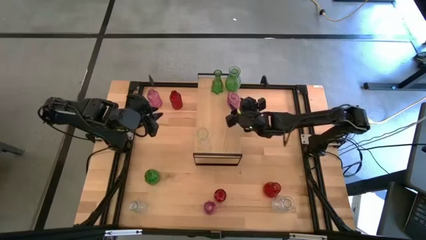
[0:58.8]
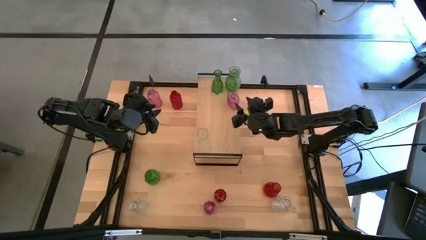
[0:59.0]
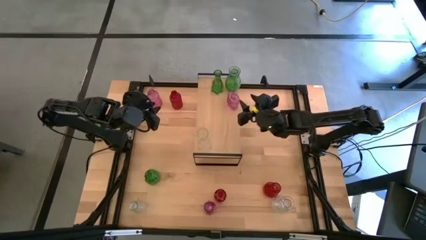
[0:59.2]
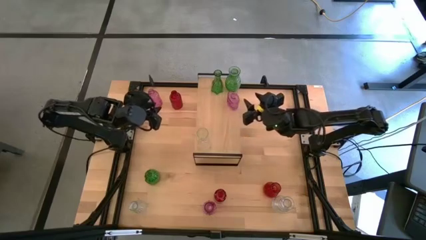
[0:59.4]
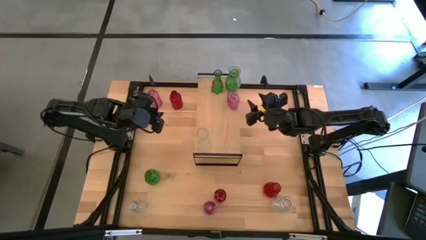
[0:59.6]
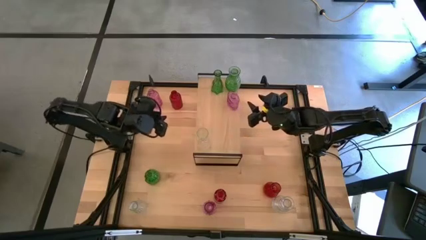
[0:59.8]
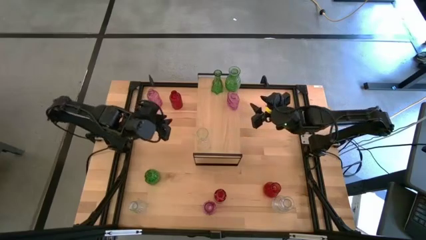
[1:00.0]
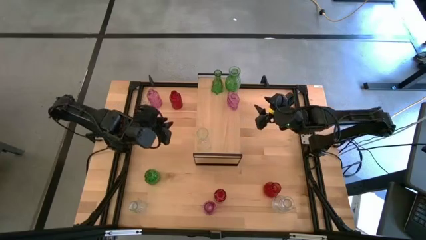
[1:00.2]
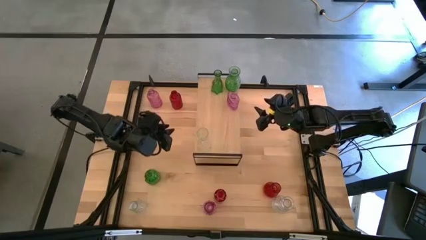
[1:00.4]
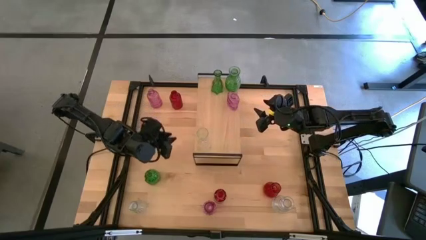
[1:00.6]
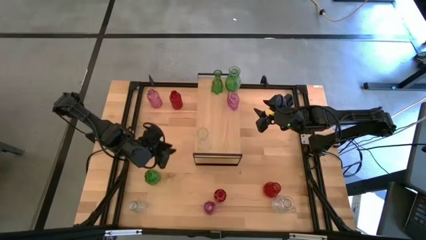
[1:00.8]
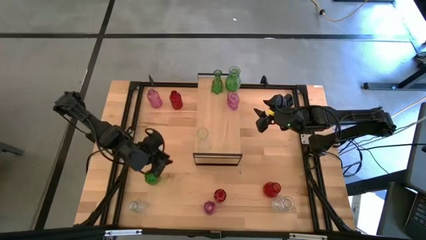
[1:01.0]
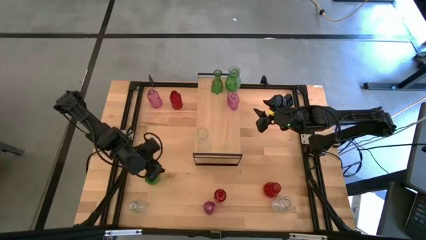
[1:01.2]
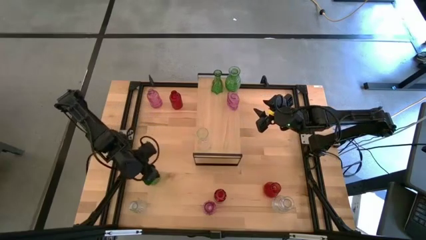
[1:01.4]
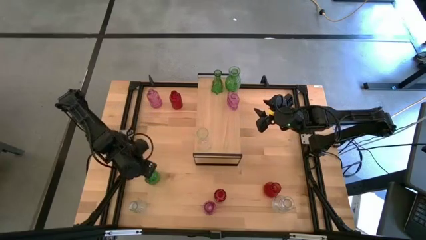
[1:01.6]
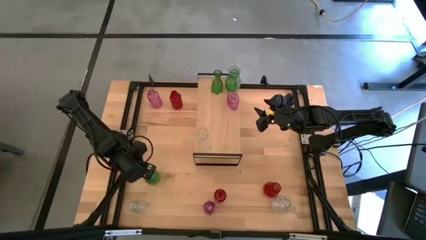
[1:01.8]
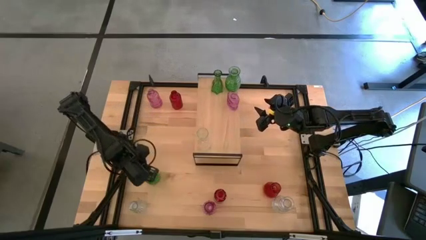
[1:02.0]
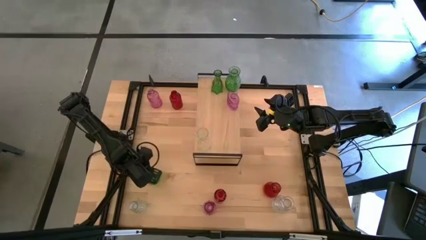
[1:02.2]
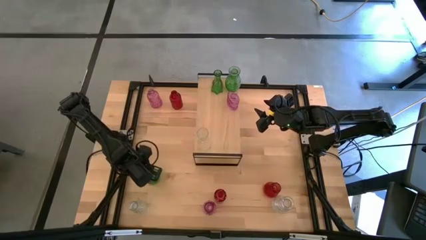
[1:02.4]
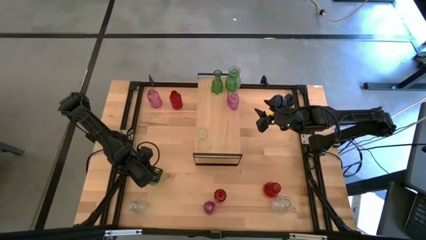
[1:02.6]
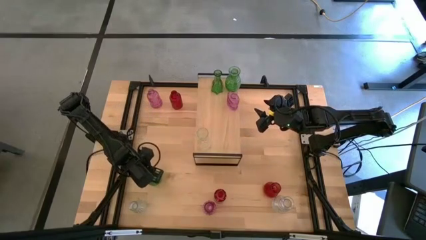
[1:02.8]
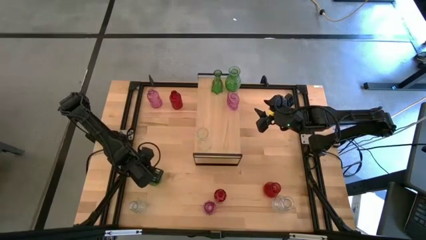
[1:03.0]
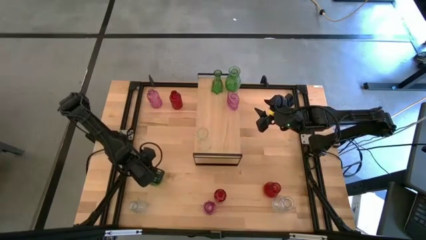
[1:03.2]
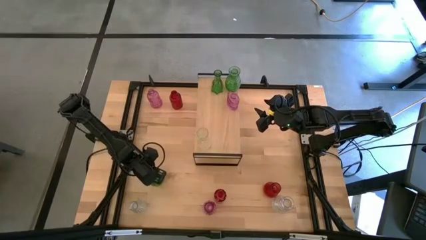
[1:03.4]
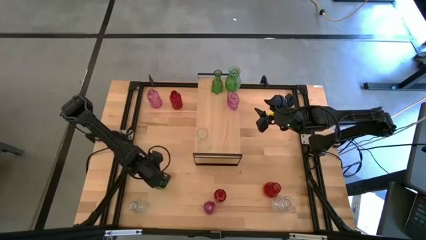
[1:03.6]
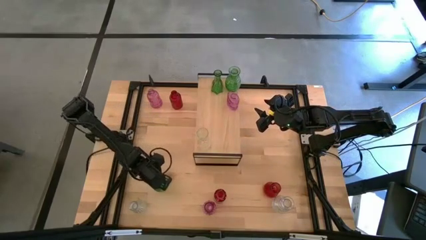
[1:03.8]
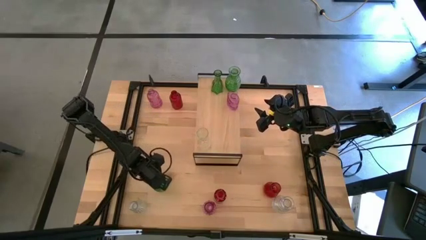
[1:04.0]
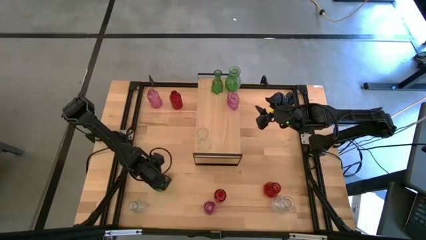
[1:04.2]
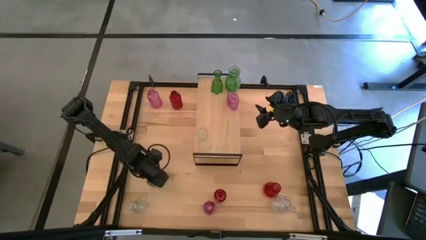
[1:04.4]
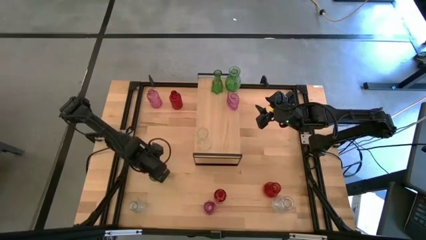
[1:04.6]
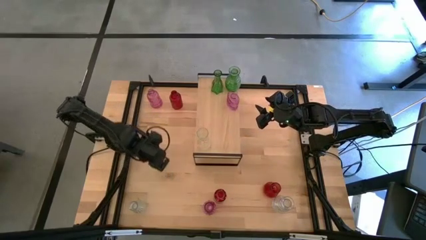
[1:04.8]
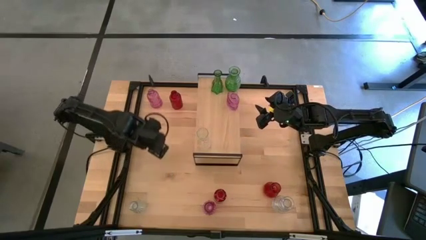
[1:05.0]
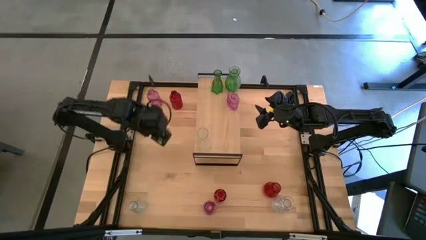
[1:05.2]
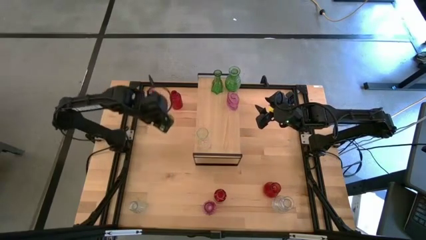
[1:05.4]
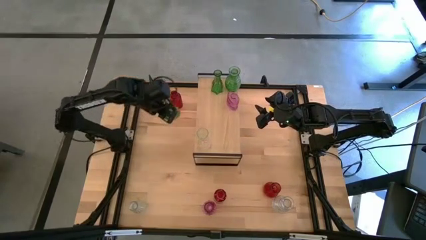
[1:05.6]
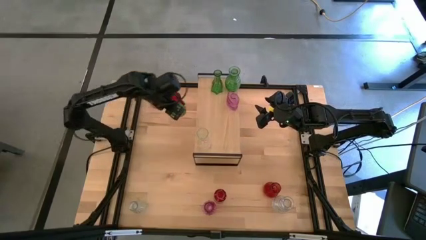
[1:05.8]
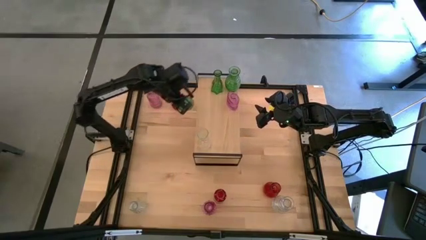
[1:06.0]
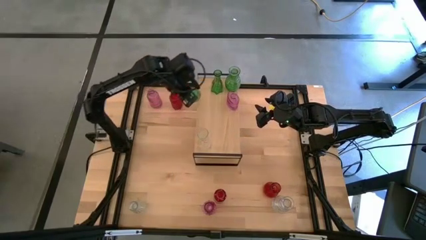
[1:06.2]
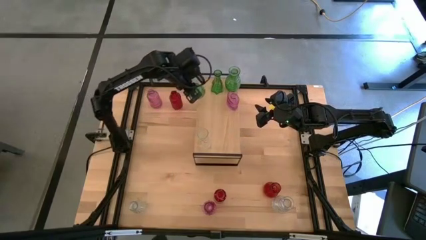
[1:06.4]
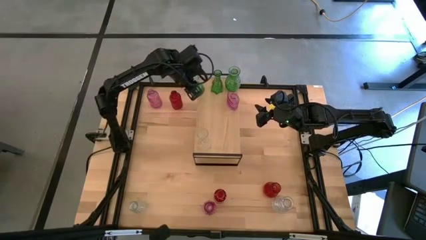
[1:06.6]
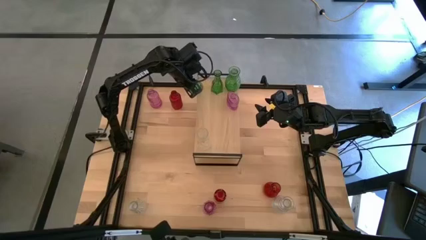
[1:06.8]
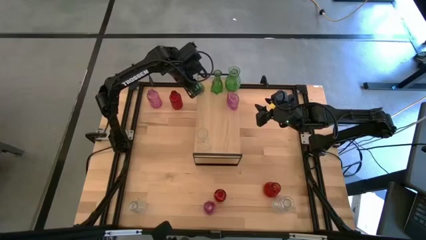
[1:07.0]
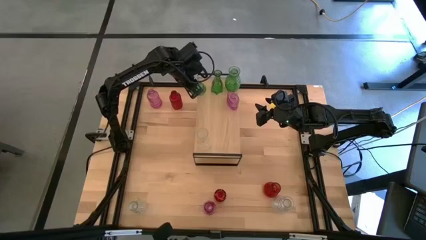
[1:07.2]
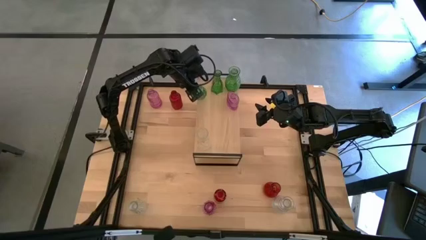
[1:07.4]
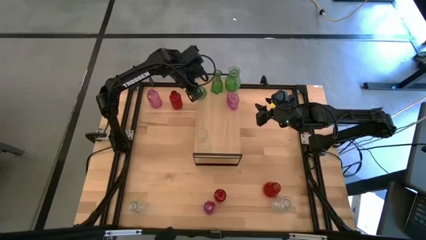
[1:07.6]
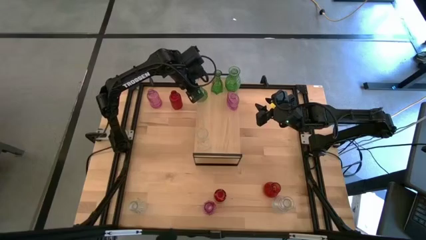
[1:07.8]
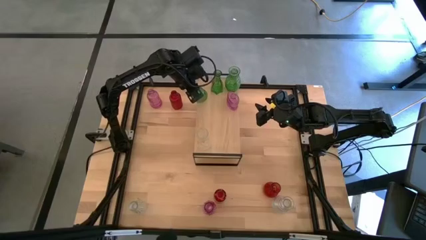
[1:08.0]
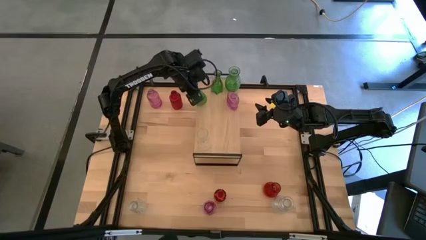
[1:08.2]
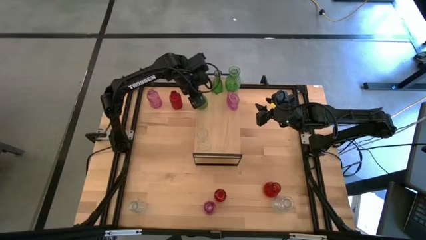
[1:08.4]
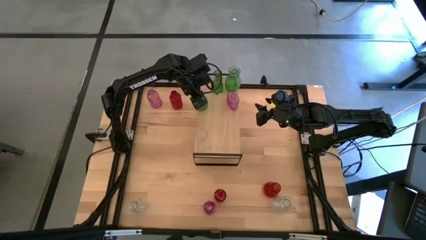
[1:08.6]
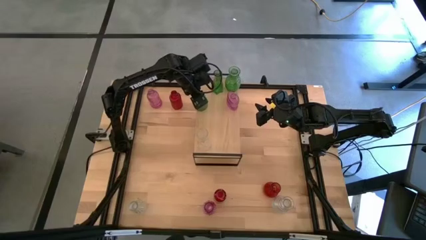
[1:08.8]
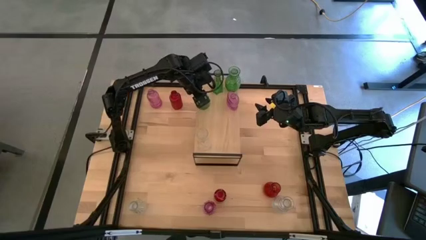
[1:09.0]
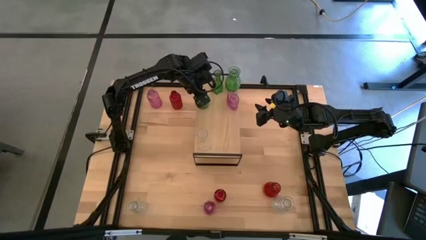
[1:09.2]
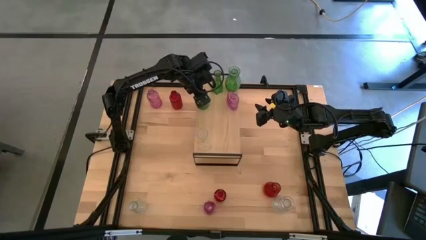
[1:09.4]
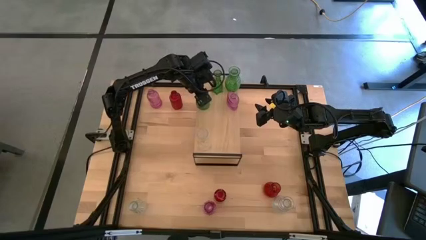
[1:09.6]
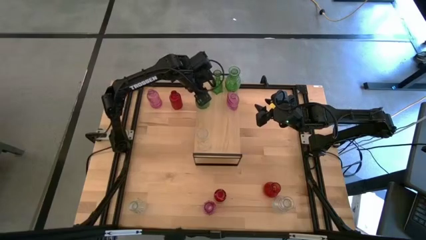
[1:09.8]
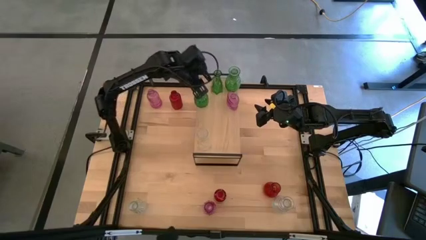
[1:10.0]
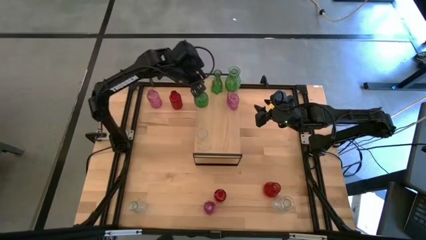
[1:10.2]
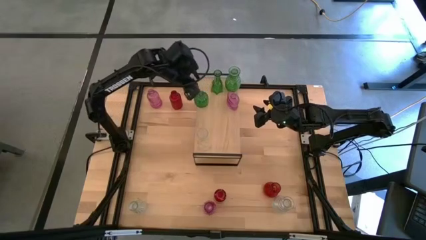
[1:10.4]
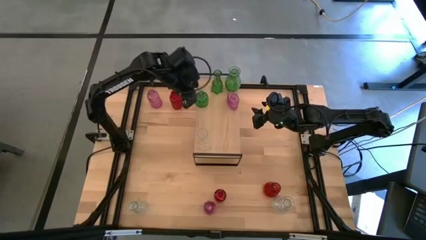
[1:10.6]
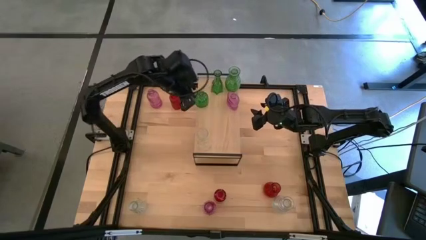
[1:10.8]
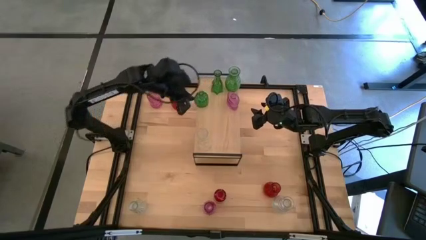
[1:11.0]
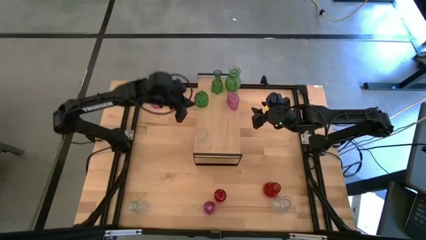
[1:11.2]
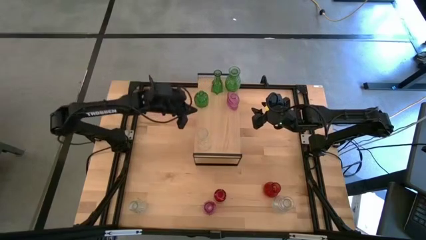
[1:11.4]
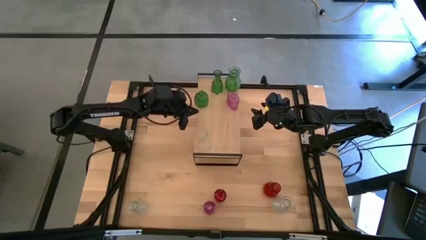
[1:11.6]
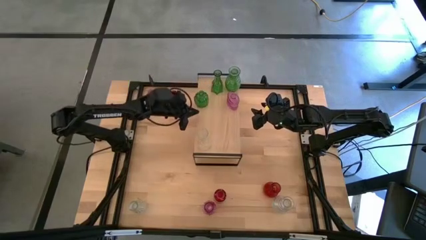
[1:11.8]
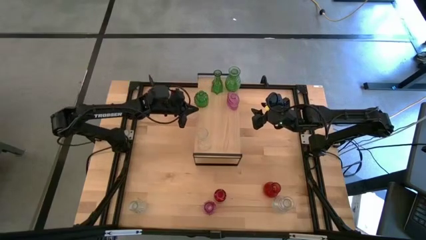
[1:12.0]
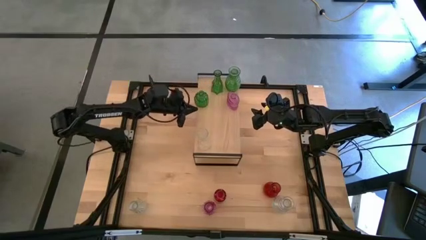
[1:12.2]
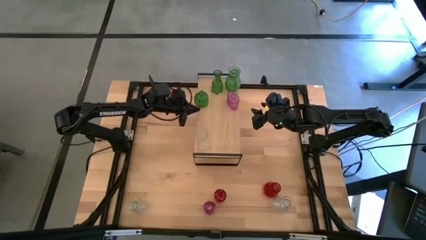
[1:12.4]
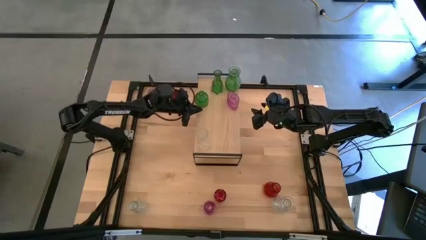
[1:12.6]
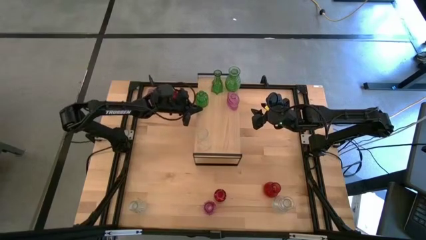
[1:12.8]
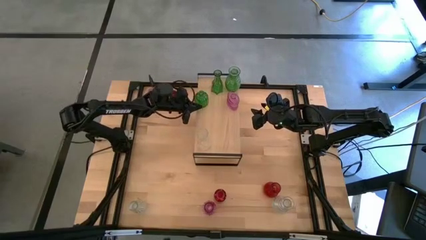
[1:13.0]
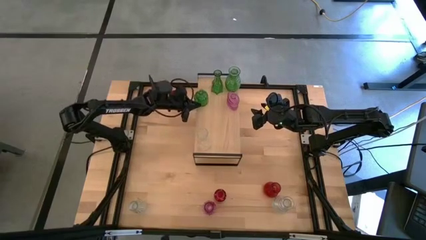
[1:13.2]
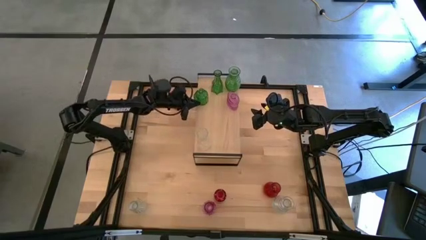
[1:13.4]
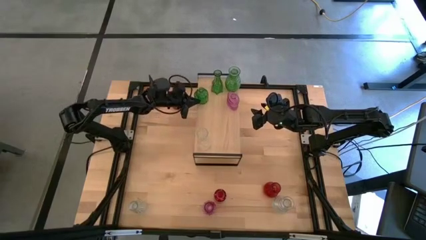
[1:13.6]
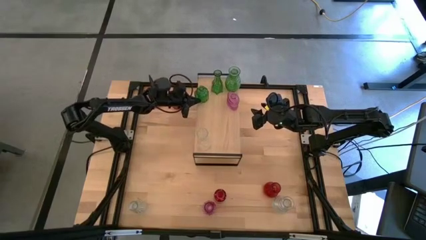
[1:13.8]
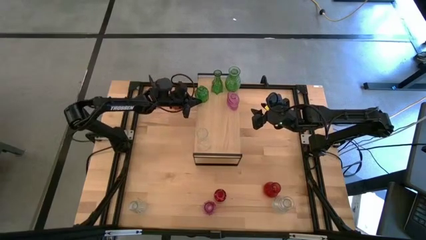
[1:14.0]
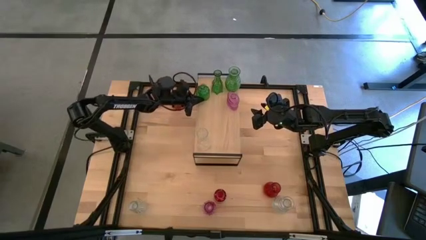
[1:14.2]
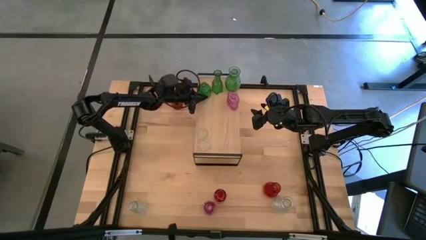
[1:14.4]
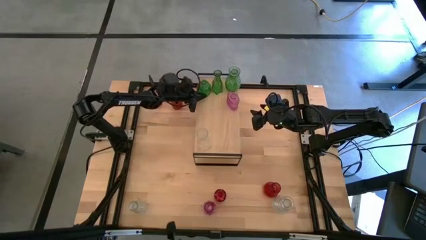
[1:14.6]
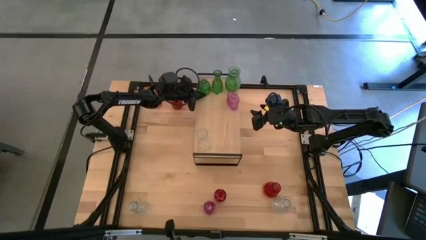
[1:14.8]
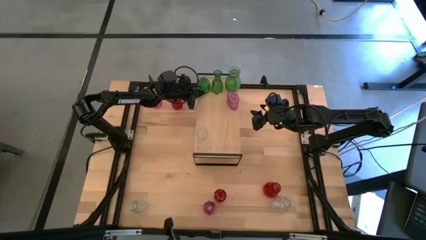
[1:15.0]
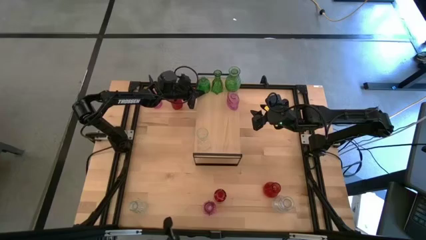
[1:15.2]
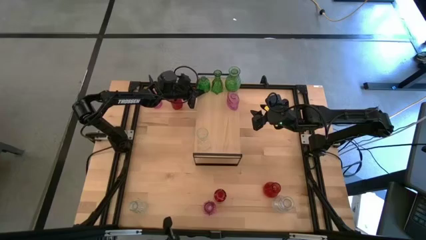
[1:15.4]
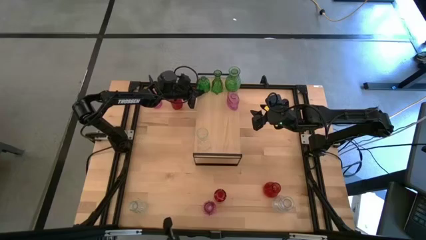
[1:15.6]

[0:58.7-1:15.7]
Task: sort vases onto shelf
Put the green vase on the shelf aligned with the other green vases

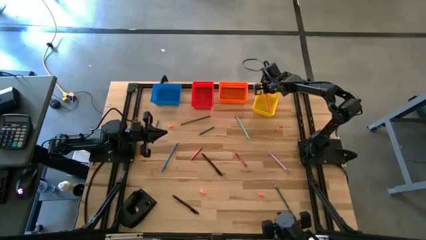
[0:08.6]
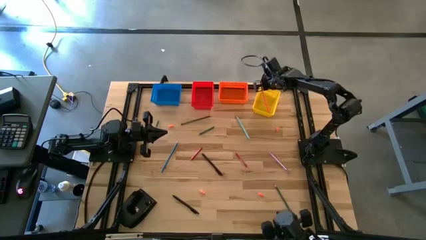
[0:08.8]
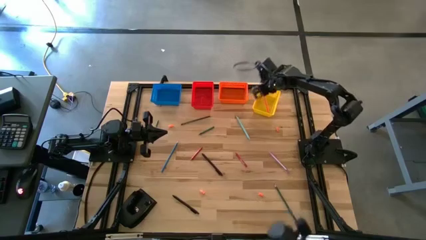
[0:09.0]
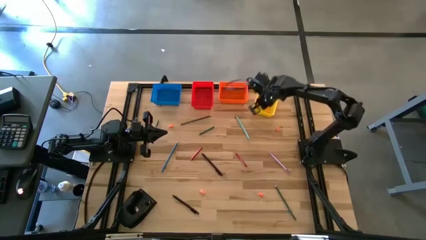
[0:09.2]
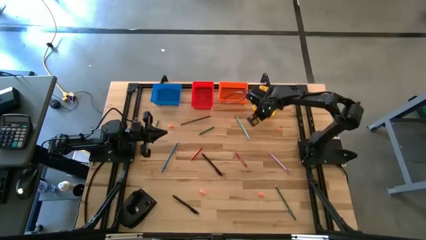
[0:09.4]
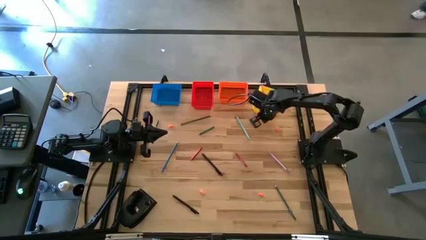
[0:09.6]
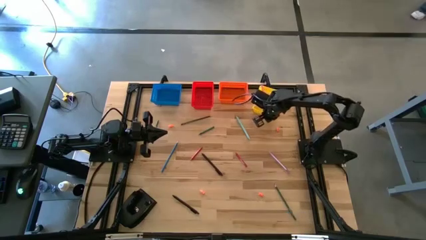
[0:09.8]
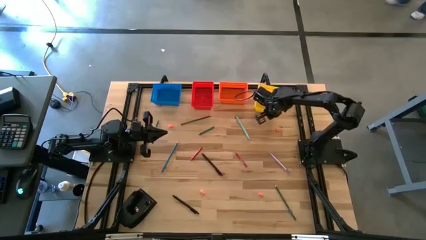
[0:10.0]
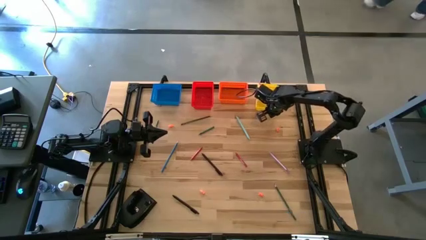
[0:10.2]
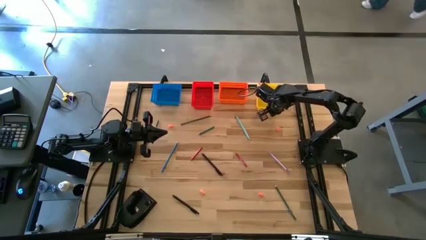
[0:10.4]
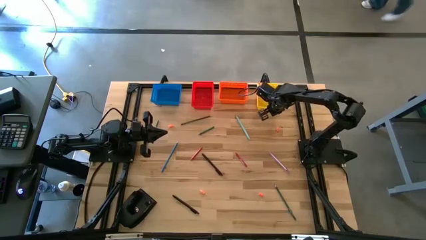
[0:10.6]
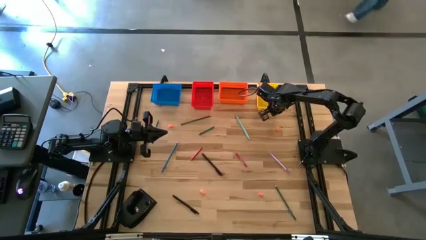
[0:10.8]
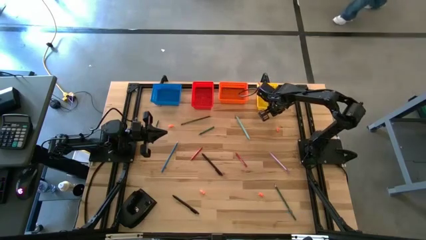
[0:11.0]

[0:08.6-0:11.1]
Task: Sort crayons/erasers/pens/pencils in bins
Adjust the yellow bin
